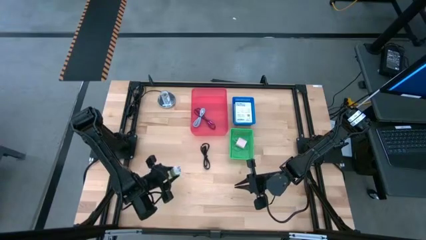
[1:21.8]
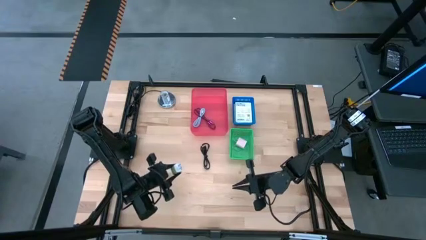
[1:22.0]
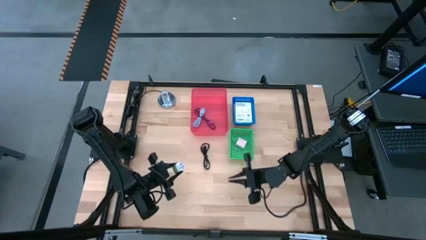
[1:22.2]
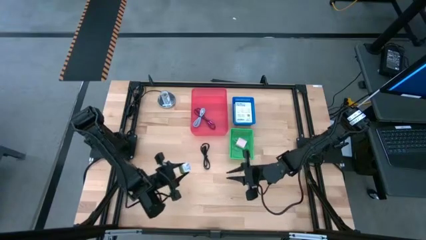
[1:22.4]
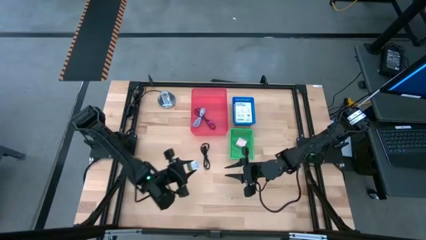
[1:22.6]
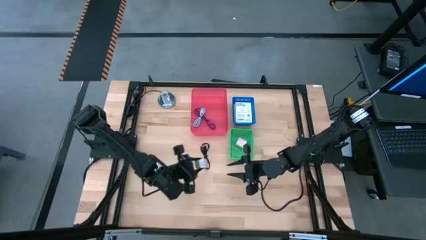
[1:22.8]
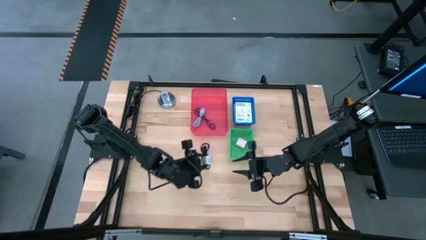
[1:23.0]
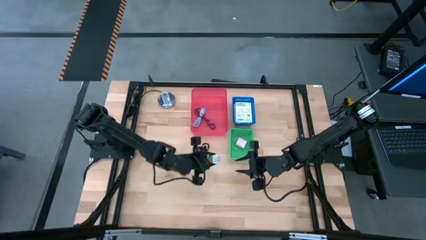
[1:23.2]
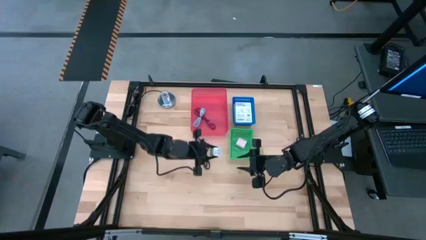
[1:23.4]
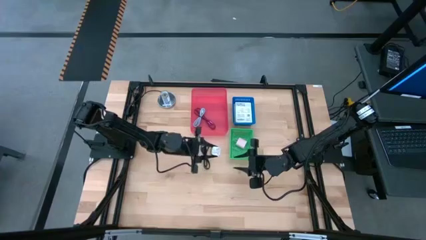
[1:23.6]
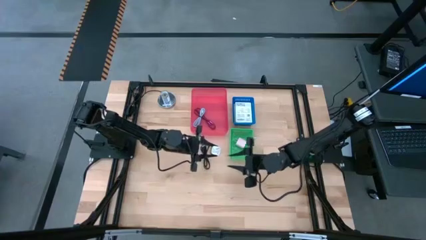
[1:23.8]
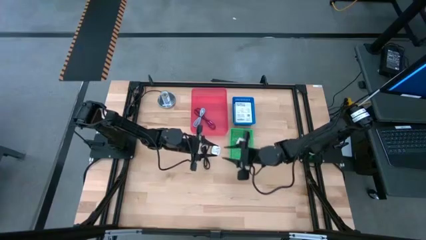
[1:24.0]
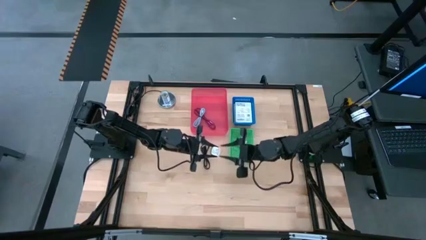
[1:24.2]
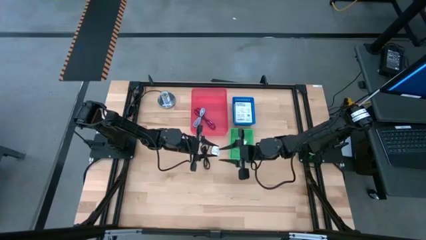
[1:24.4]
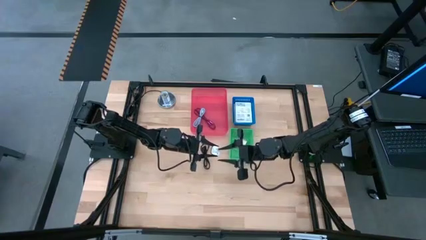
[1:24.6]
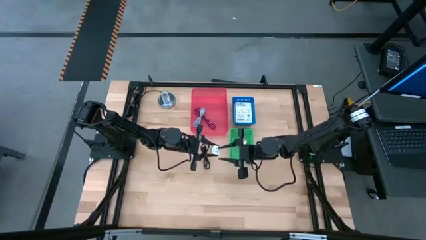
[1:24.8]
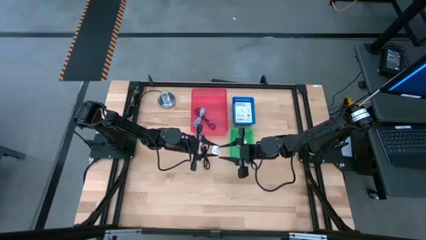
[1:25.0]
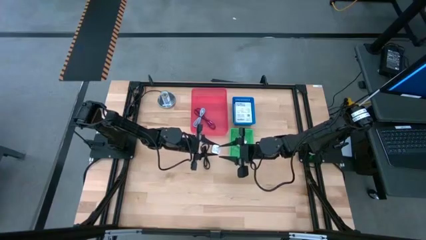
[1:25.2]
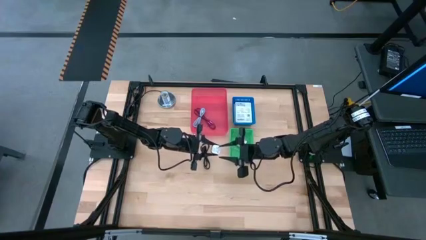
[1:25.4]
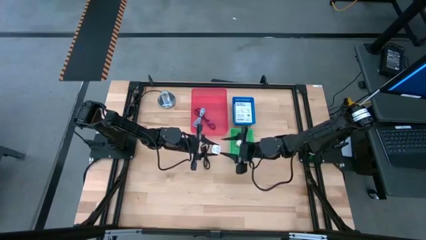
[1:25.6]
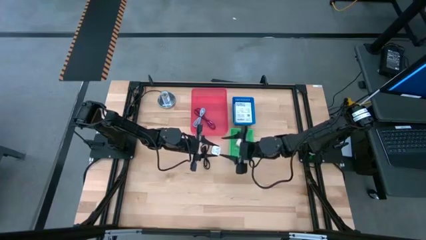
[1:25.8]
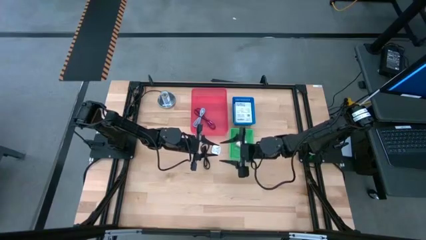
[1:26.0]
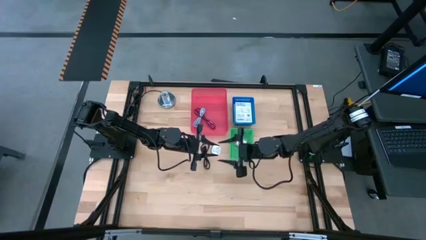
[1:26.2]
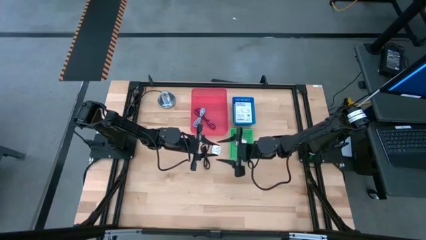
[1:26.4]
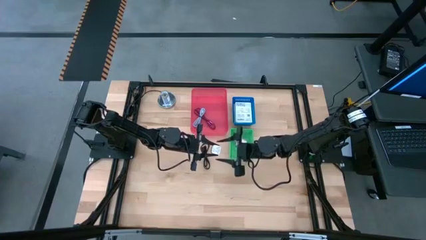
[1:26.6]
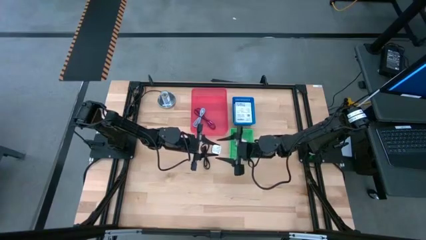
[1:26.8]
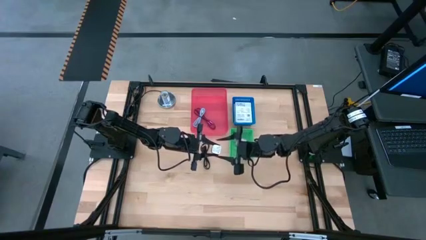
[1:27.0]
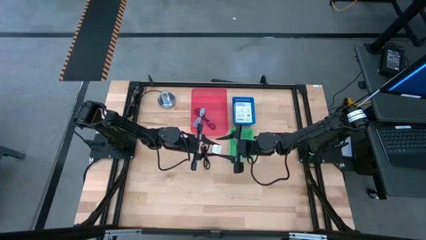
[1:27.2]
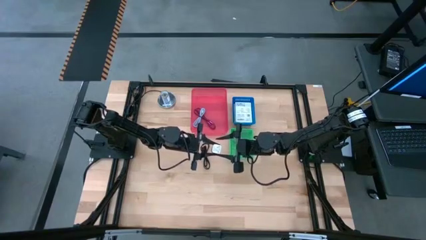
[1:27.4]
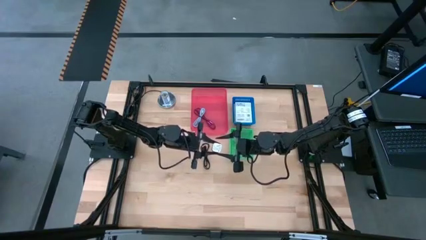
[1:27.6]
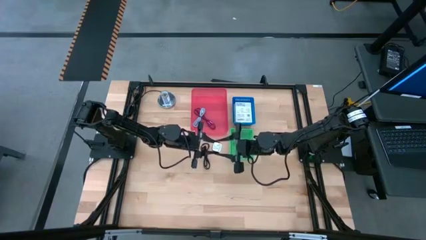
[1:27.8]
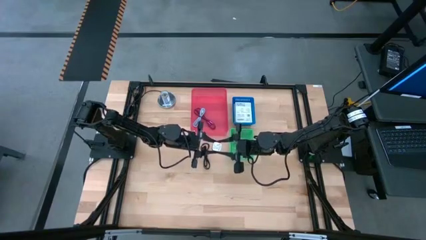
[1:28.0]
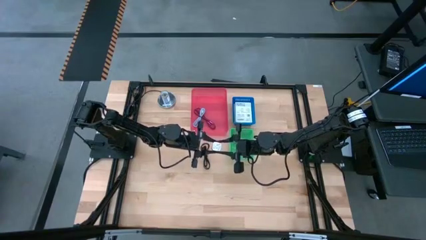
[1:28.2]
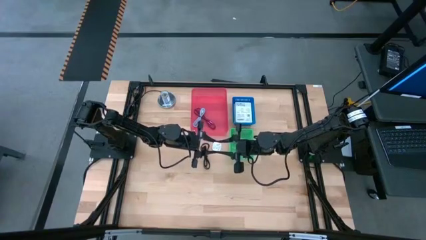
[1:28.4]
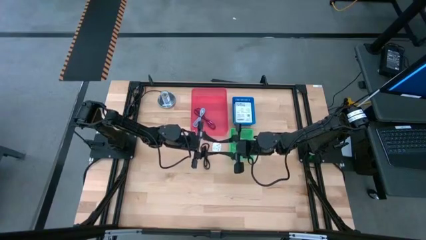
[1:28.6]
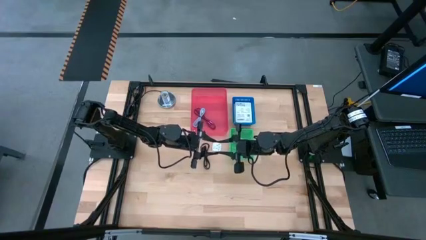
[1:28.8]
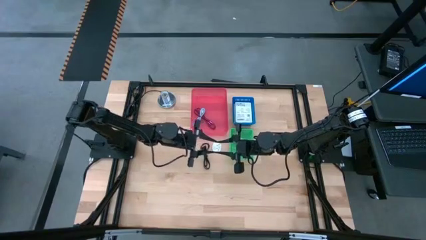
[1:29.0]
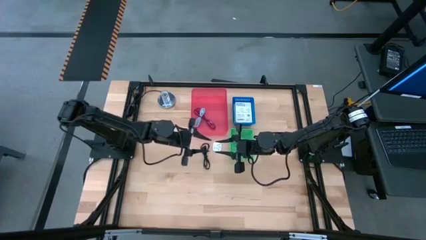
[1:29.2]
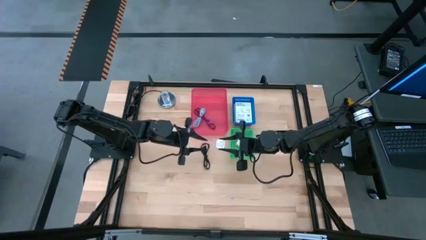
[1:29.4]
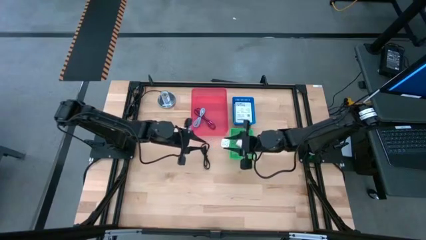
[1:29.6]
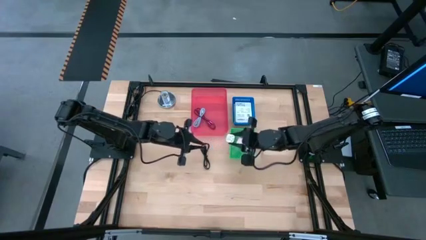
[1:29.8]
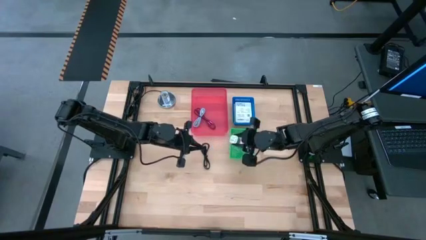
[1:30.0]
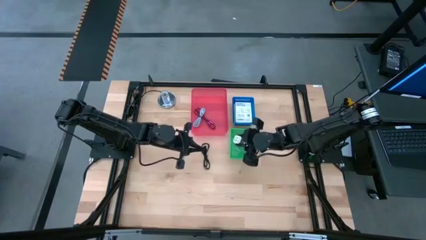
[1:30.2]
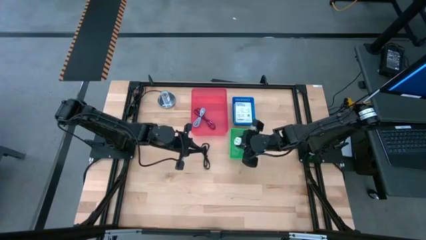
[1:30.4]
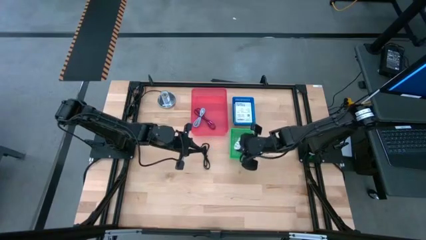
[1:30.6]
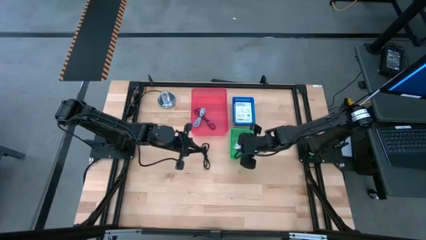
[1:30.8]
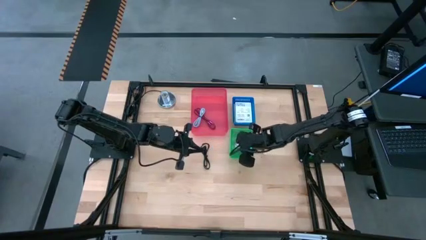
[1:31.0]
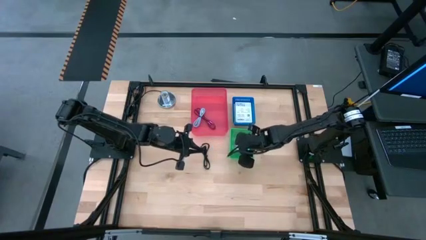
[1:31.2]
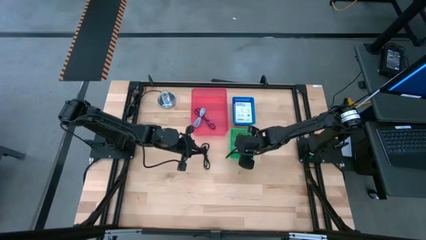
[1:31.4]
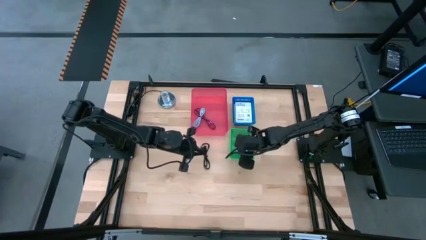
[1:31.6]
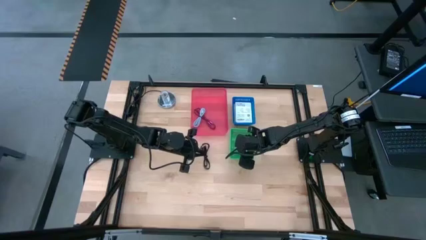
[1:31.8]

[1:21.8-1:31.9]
Task: Pick and place items into bin
Put the green charger adapter into the green bin

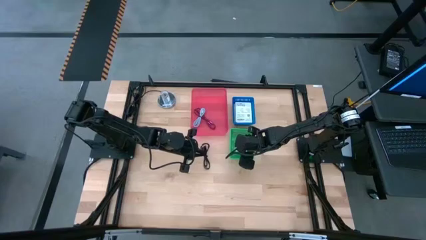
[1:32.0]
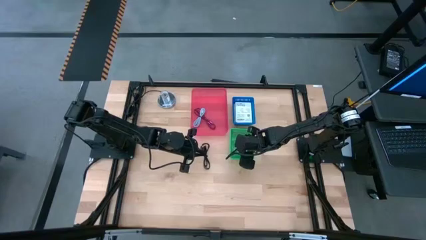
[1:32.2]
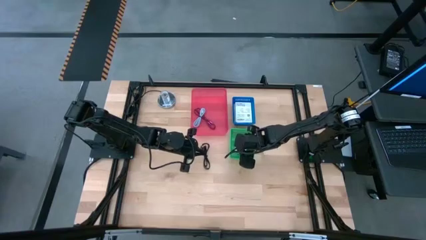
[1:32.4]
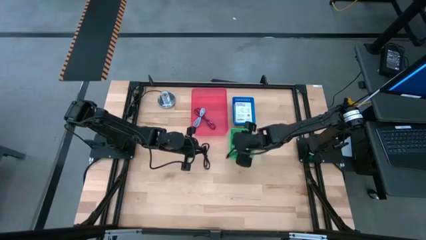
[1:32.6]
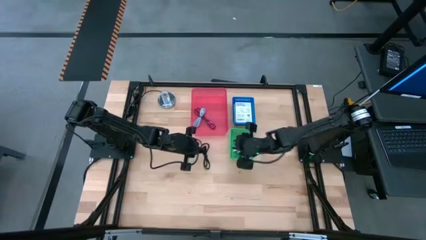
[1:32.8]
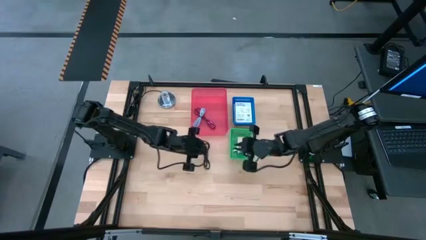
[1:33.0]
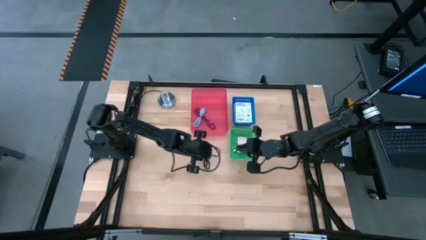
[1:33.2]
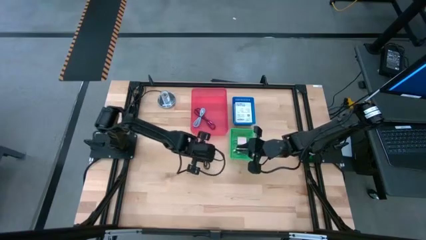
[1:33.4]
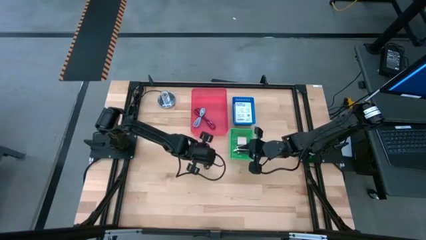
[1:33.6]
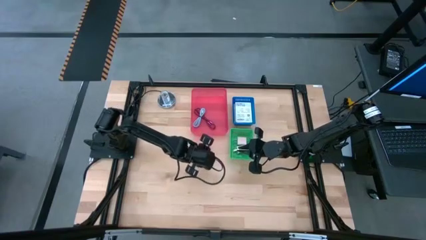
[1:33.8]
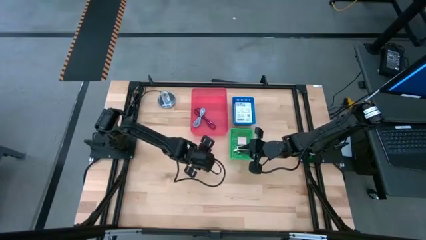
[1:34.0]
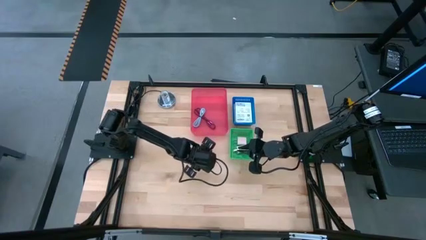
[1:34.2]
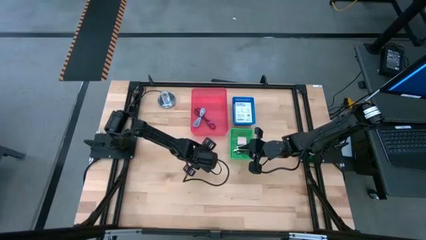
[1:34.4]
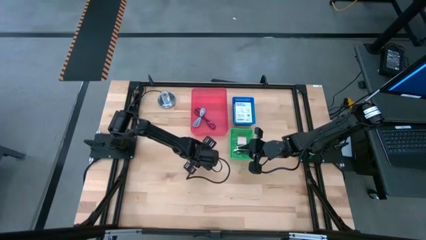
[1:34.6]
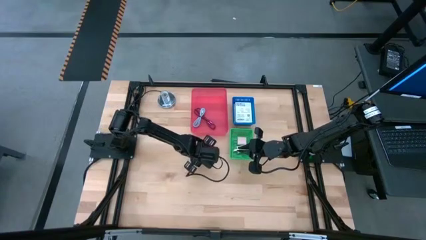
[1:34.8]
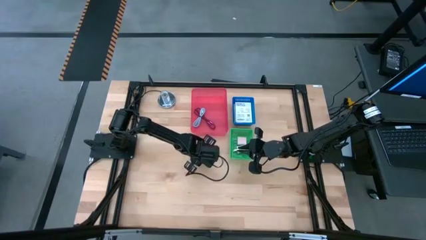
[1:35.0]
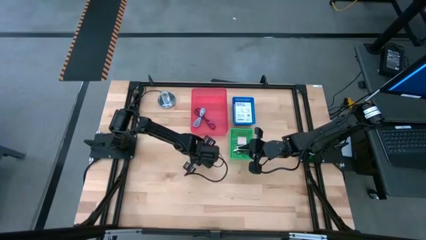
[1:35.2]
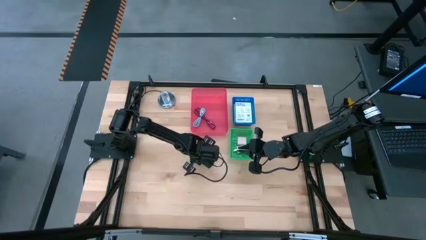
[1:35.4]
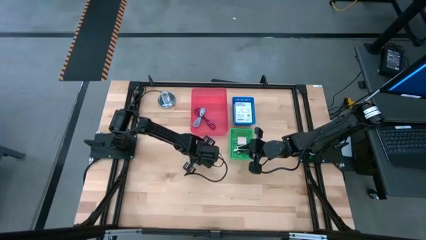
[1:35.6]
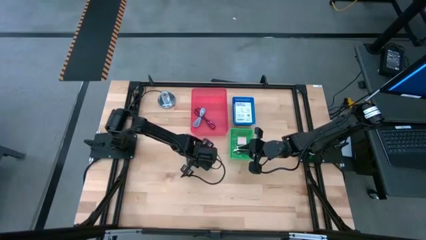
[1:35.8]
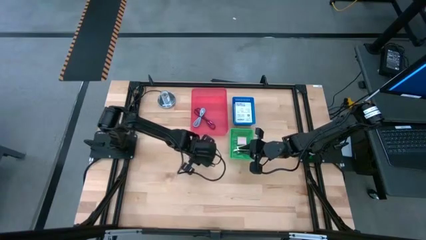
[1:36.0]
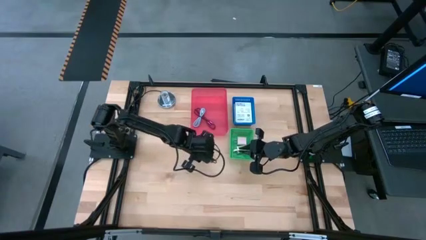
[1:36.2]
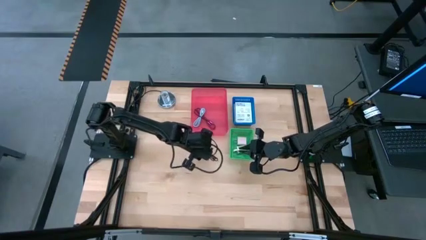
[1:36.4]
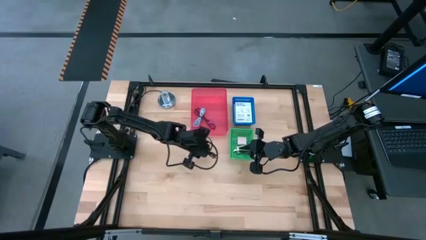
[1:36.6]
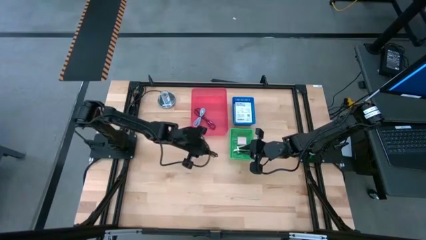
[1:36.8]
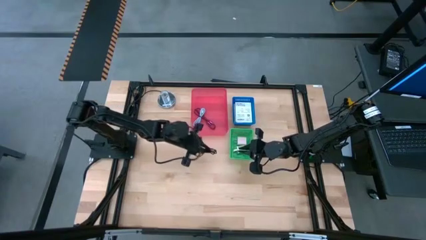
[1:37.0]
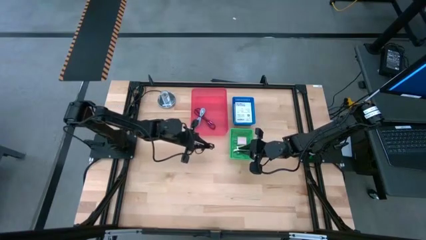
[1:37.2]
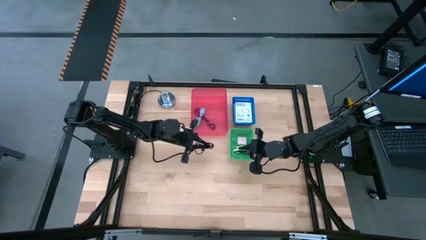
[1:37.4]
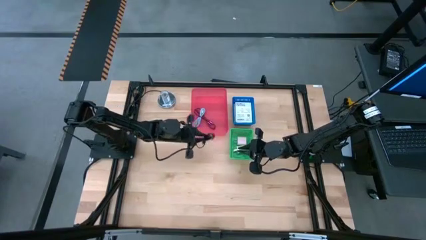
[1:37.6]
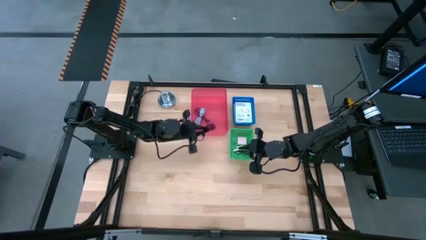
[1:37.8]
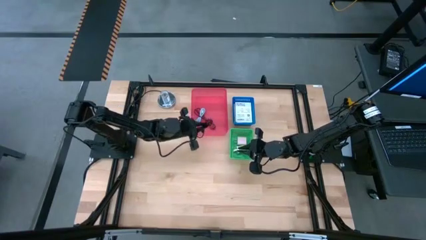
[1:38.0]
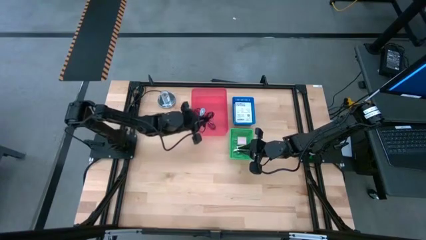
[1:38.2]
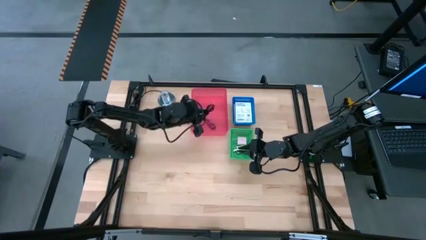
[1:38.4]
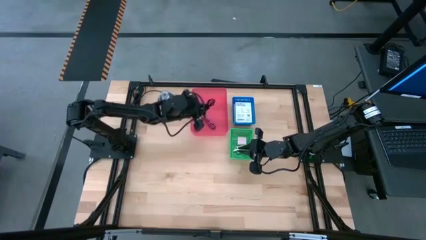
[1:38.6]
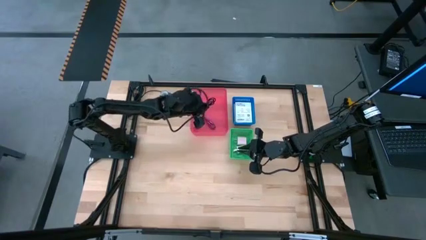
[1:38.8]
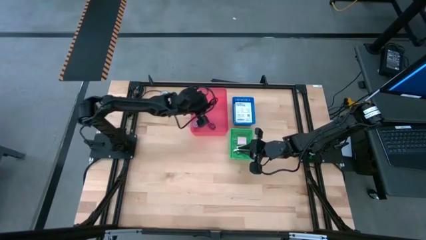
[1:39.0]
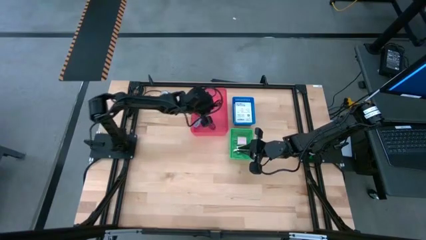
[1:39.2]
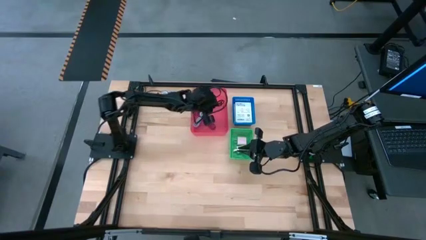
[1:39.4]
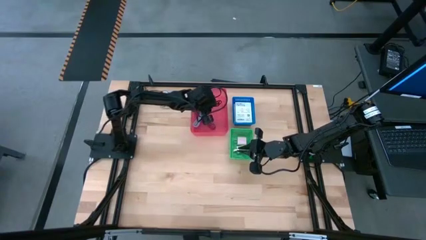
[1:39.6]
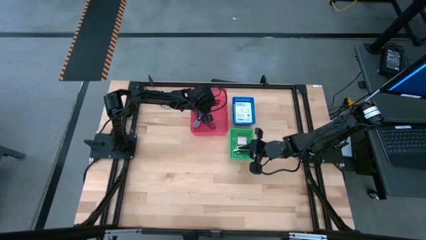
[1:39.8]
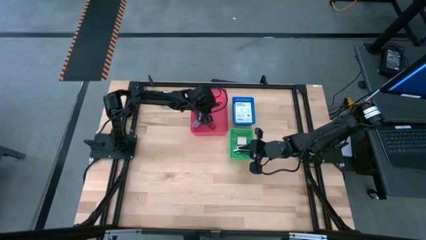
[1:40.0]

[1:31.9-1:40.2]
Put the black USB cable into the red bin
